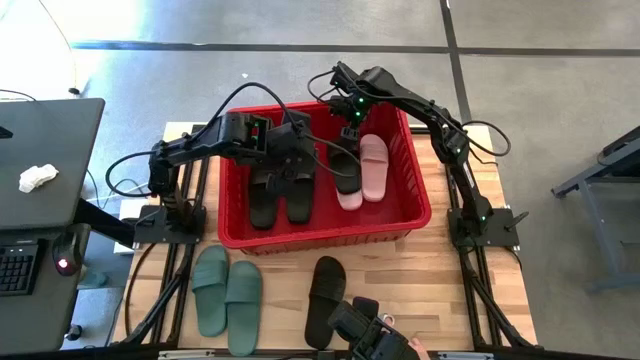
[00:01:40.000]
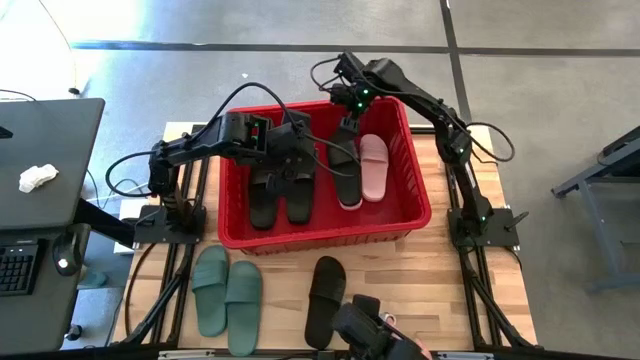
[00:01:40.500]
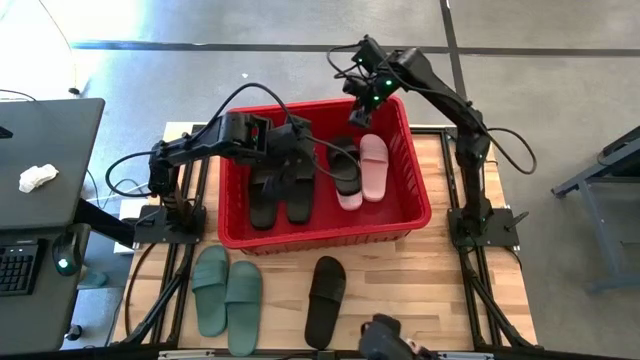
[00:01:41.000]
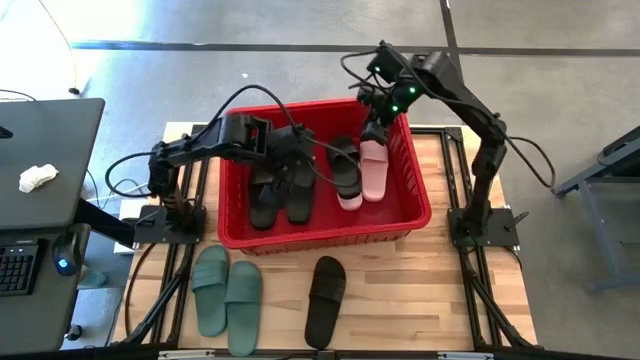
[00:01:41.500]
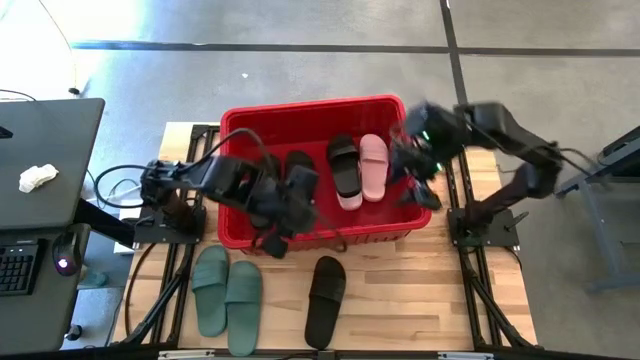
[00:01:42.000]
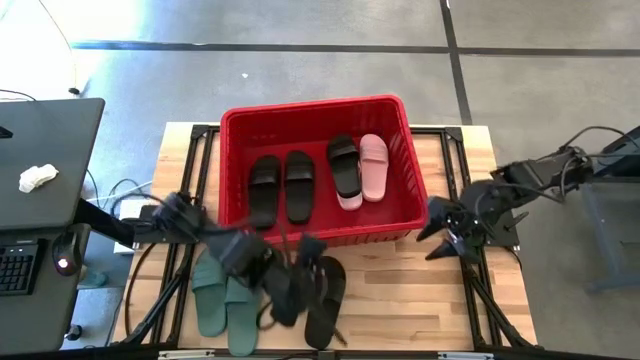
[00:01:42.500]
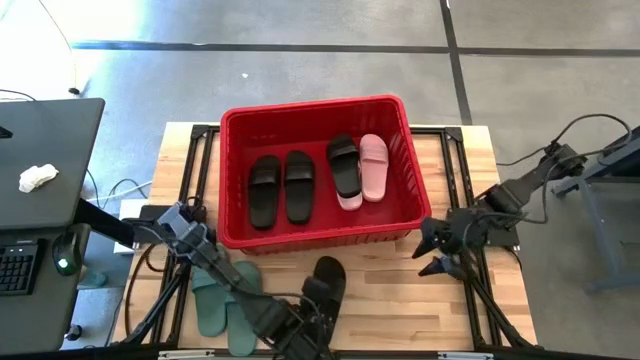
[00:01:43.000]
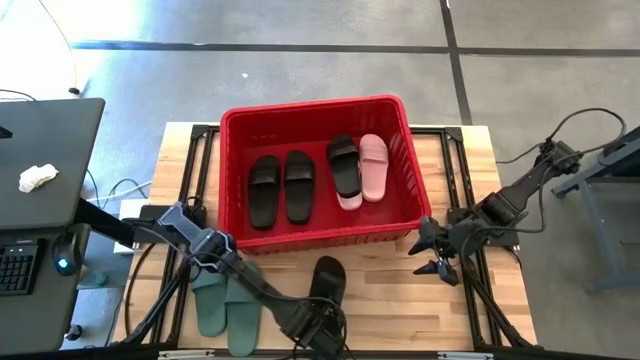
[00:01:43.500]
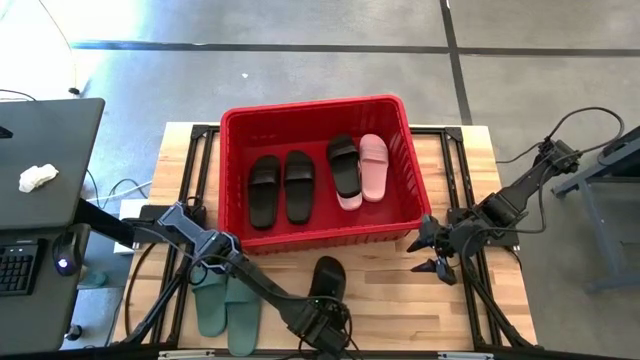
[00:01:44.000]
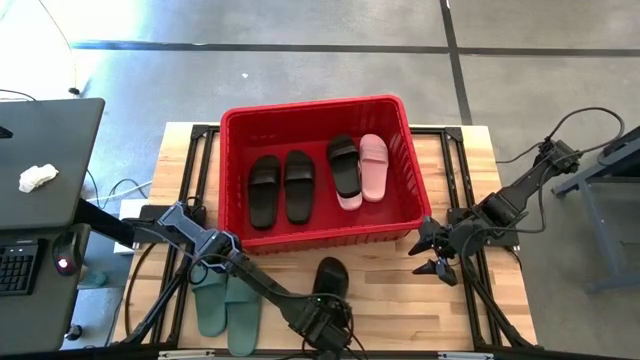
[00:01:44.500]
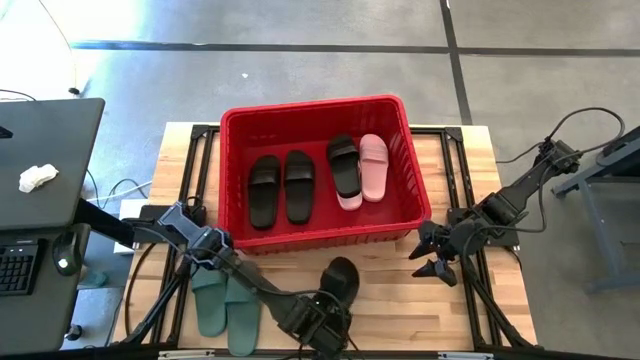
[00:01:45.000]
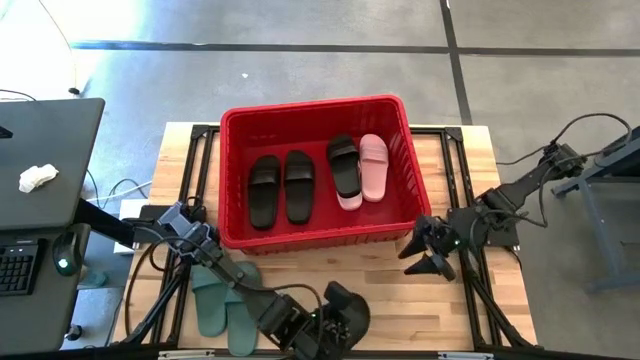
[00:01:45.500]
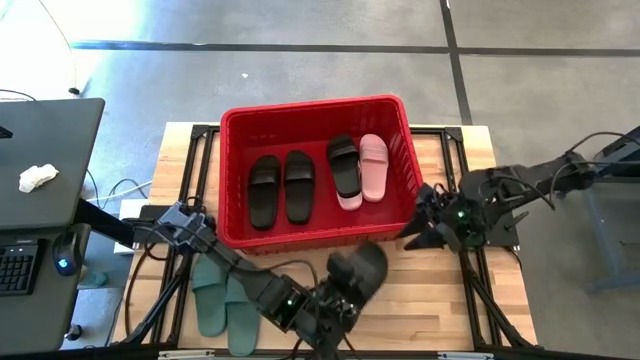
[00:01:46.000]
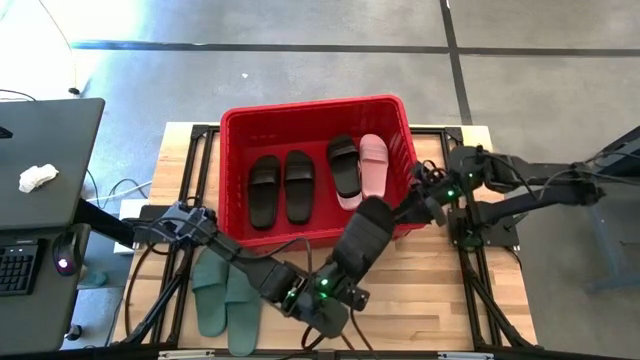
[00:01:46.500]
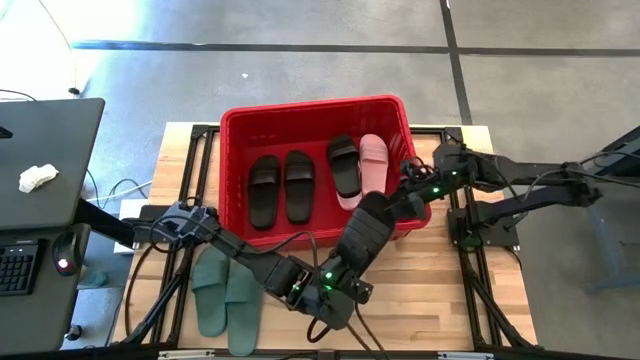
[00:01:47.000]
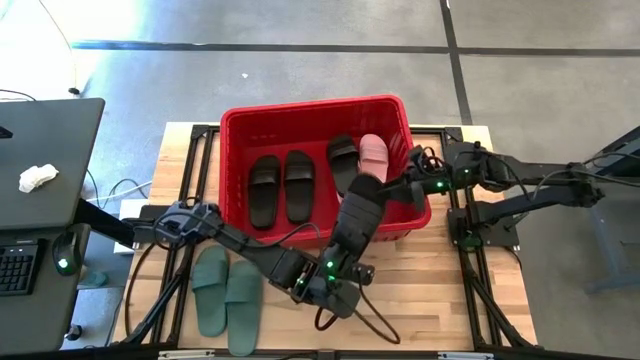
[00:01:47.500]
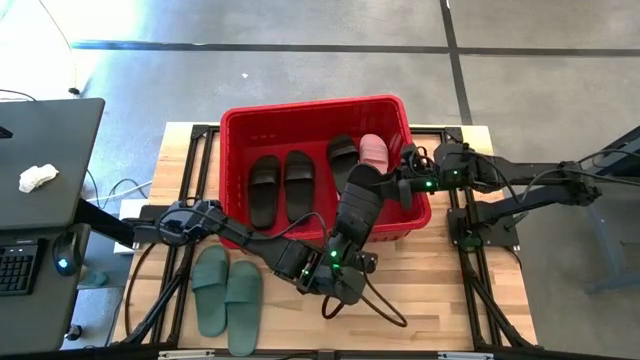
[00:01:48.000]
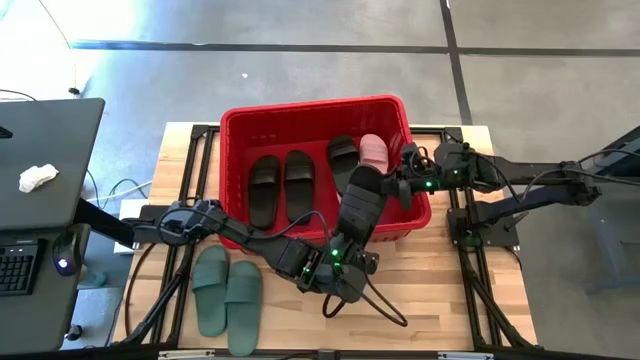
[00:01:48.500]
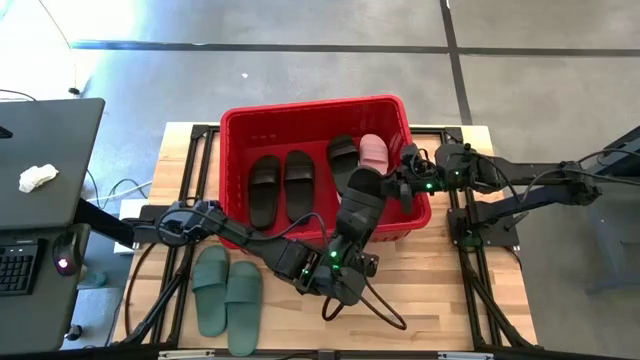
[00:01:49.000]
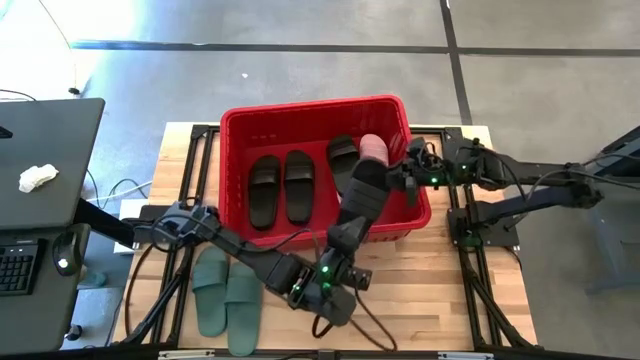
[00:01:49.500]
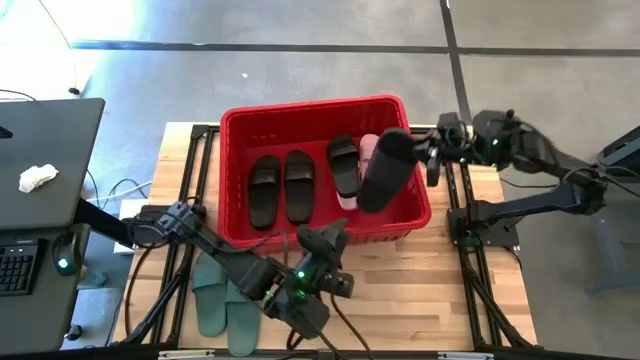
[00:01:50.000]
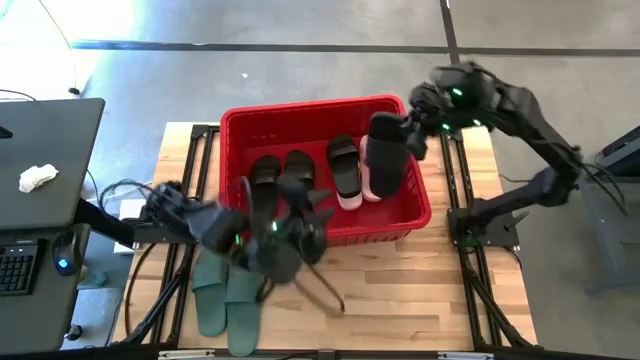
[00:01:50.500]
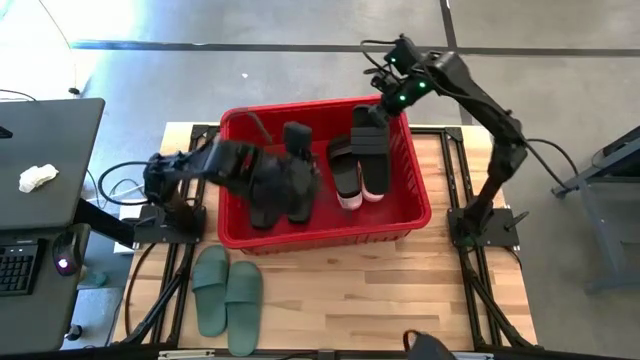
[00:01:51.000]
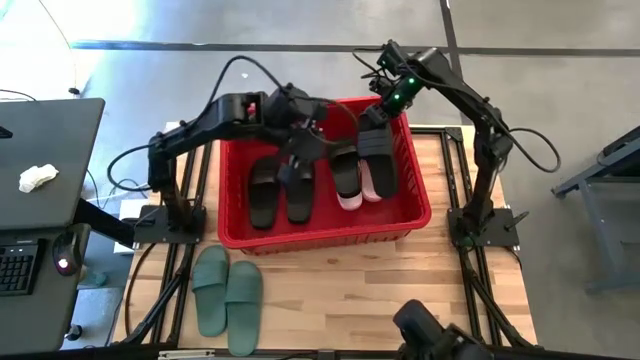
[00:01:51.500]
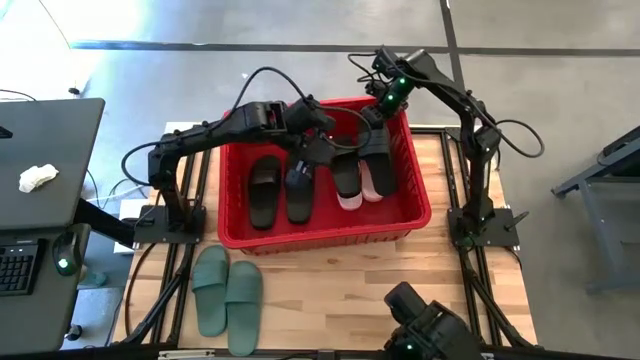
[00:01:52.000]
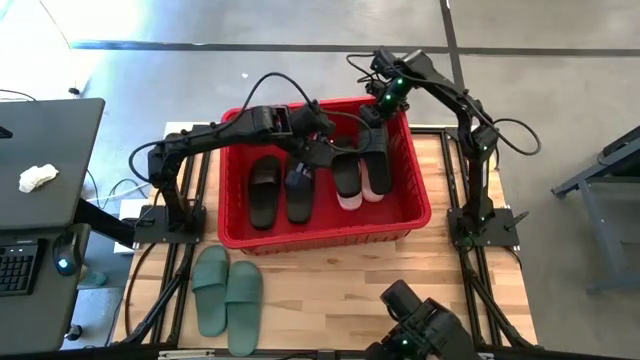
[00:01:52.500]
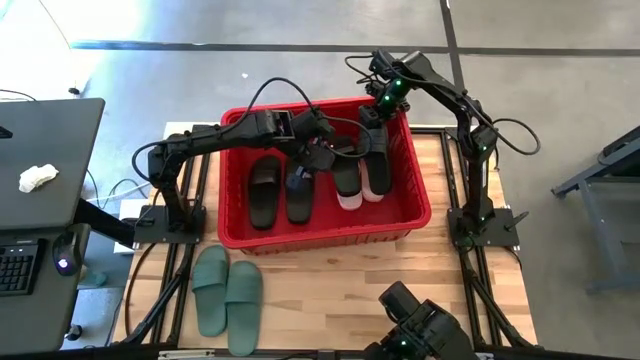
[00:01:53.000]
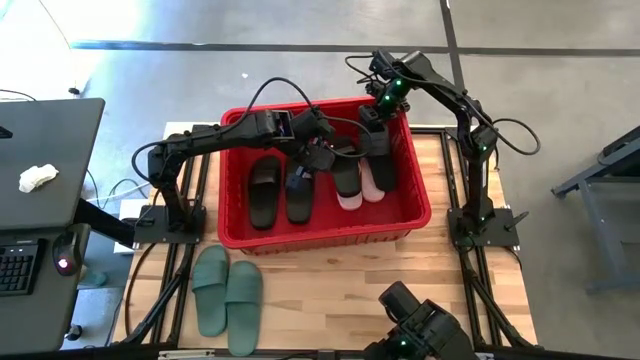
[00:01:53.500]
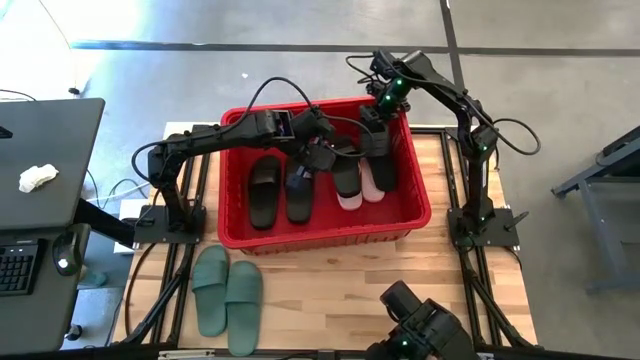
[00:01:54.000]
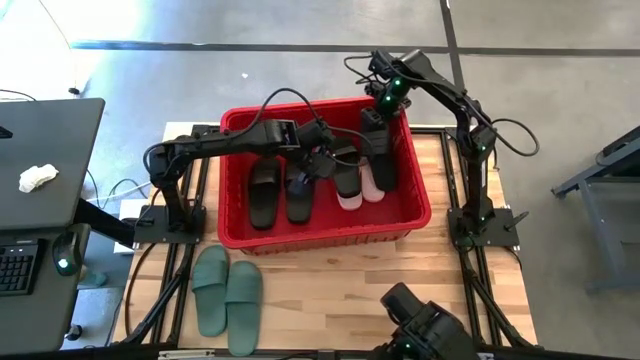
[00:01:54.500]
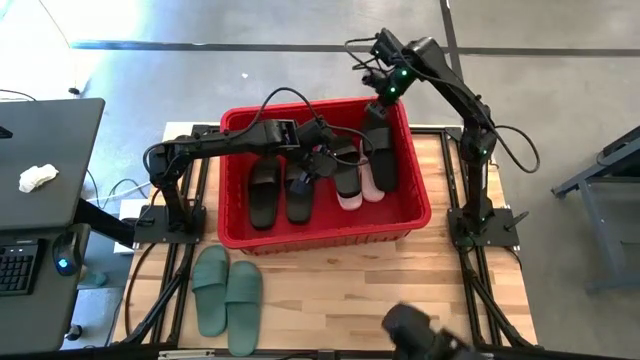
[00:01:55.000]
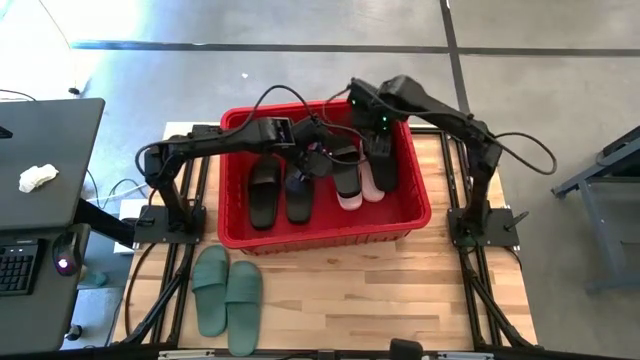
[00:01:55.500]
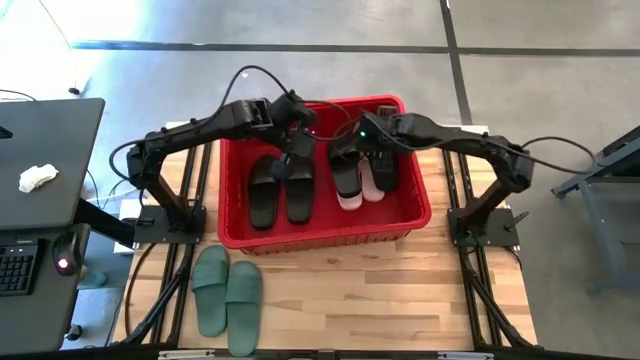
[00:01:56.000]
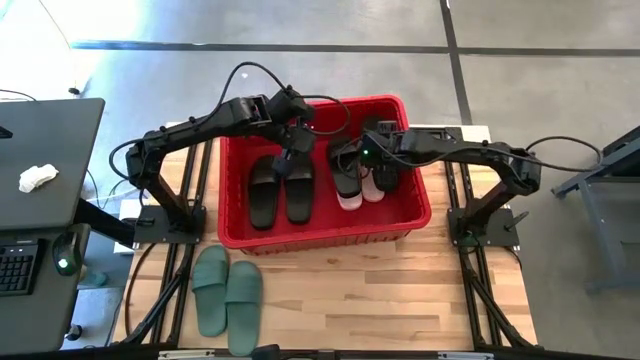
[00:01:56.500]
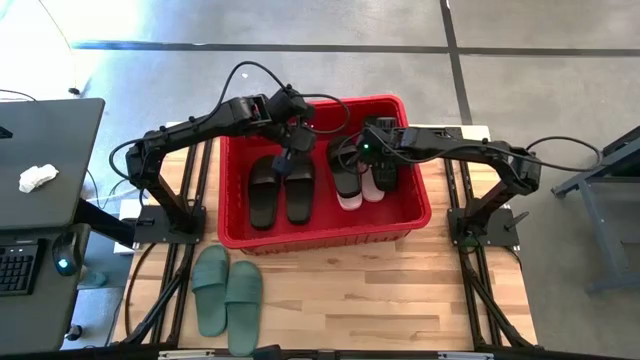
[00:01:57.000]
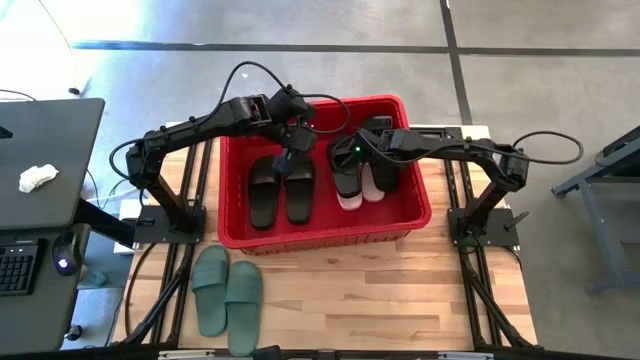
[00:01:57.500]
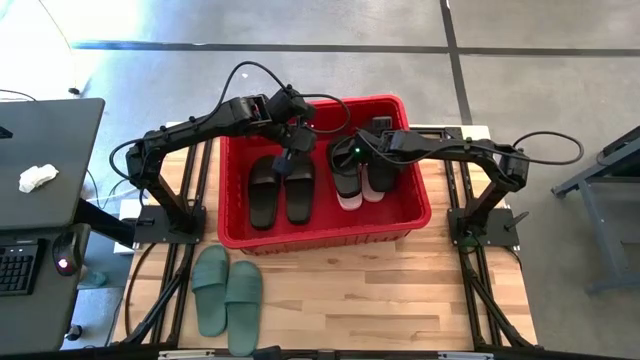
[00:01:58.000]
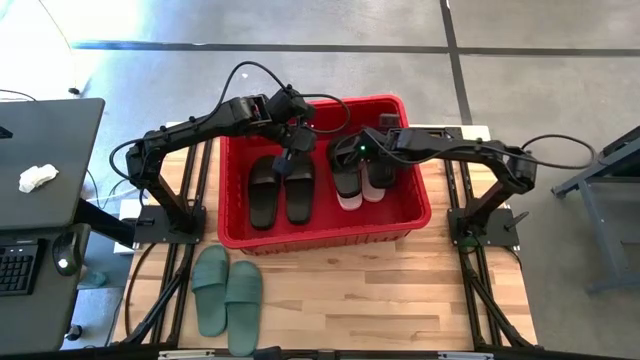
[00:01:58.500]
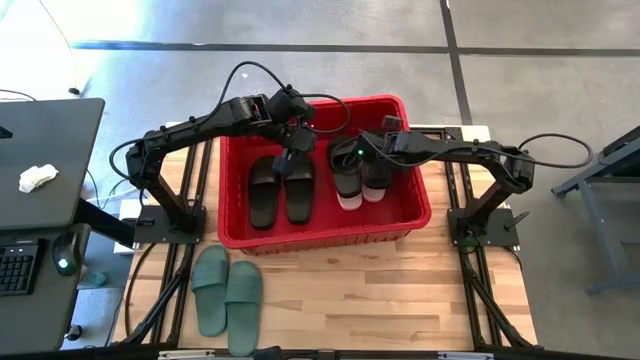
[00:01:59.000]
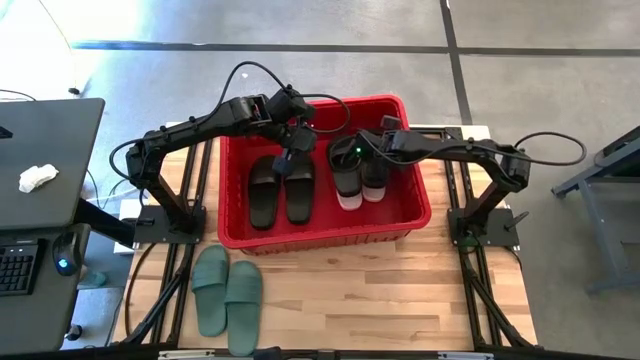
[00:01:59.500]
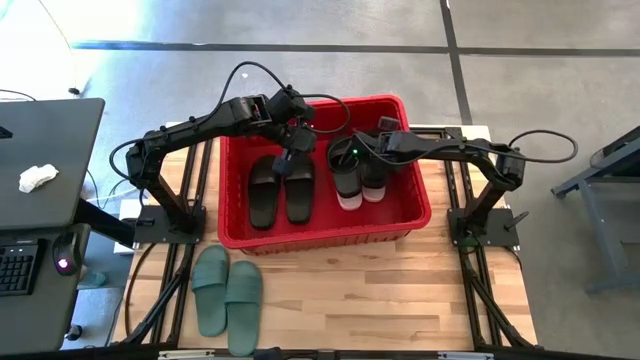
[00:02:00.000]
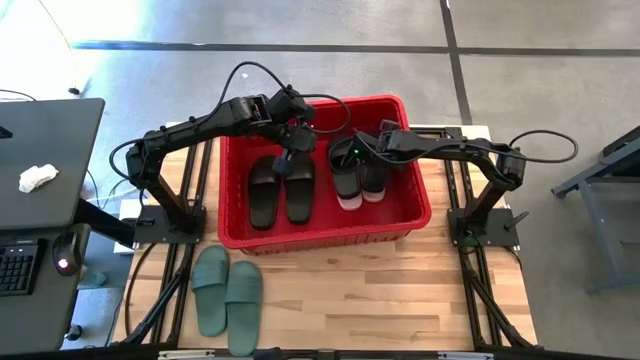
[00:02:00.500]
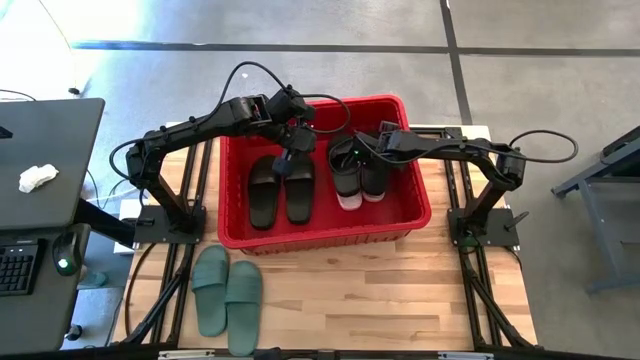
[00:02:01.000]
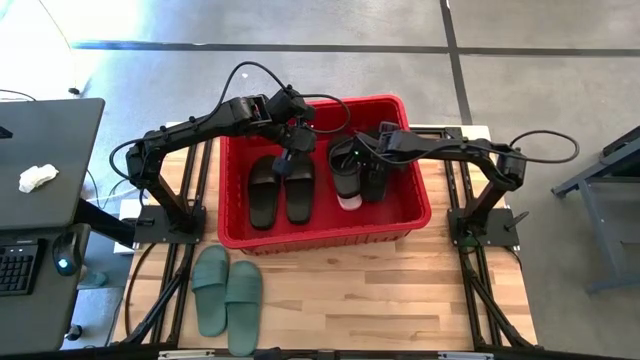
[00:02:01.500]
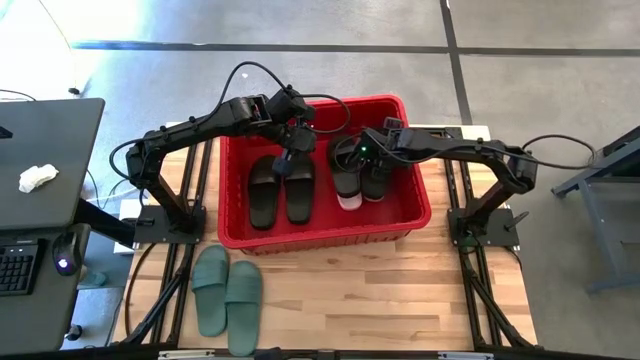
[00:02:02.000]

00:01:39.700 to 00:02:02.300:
Task: Pick and place slides into bin
Stack the black slipper on top of the pink slipper in the red bin
